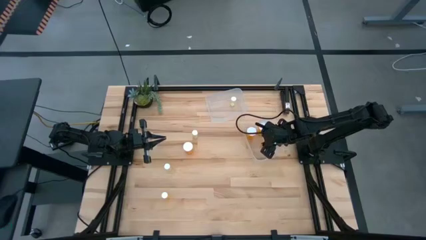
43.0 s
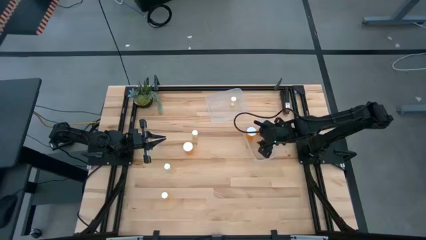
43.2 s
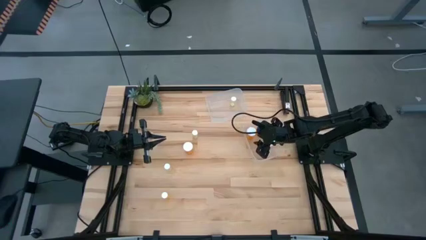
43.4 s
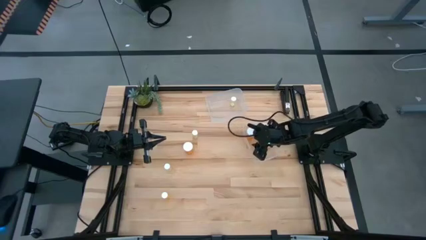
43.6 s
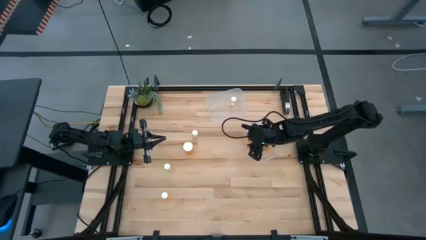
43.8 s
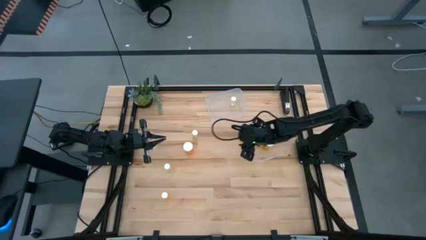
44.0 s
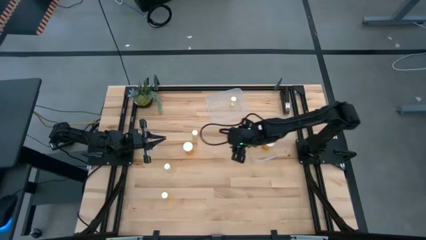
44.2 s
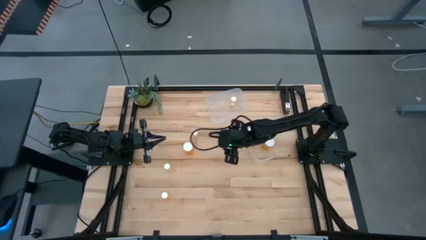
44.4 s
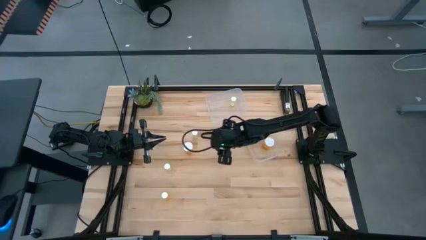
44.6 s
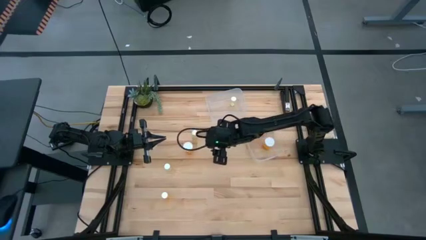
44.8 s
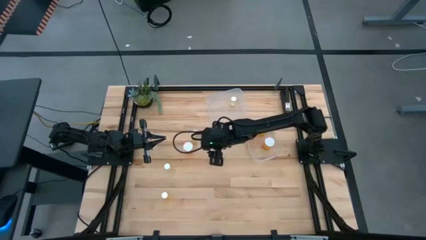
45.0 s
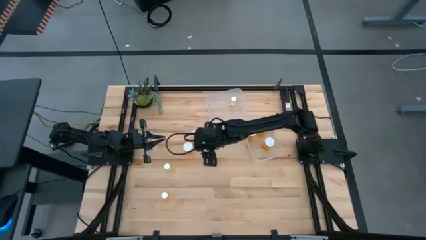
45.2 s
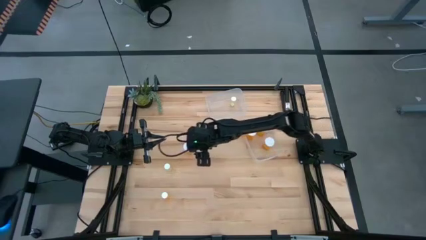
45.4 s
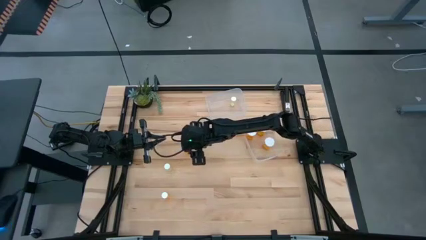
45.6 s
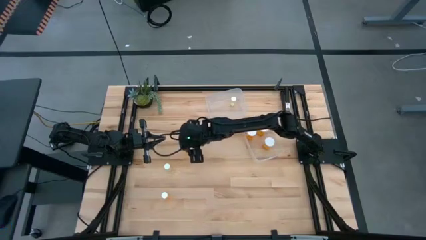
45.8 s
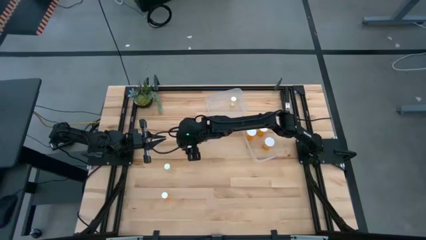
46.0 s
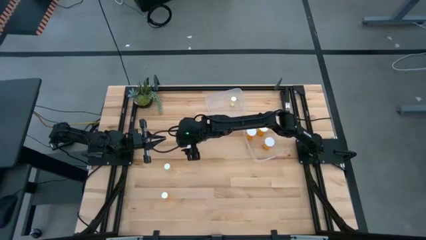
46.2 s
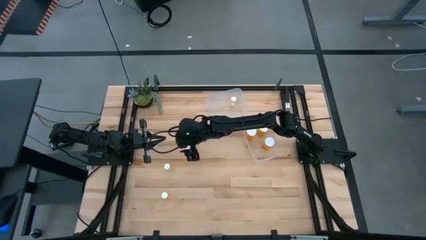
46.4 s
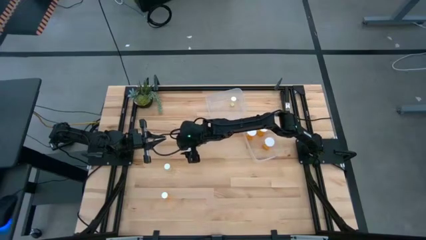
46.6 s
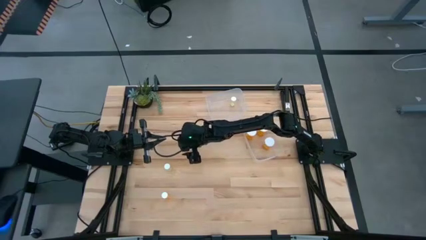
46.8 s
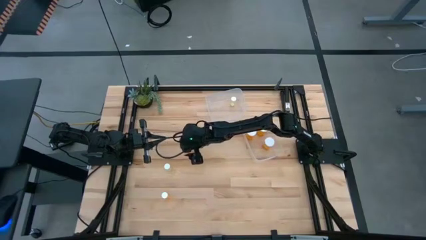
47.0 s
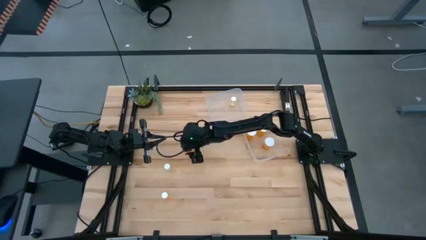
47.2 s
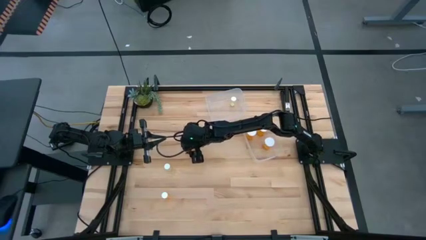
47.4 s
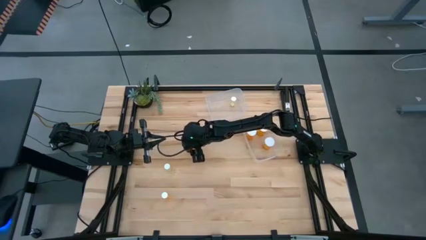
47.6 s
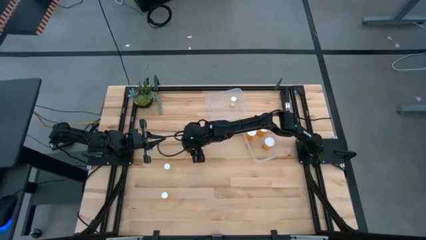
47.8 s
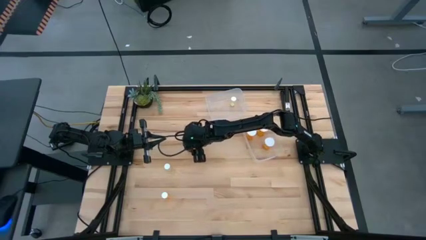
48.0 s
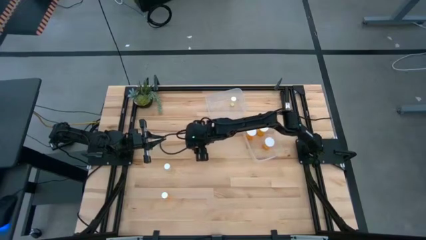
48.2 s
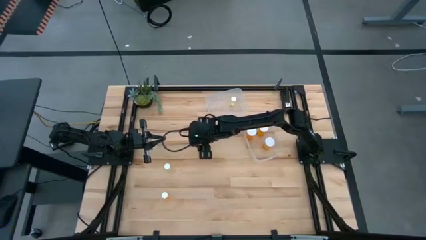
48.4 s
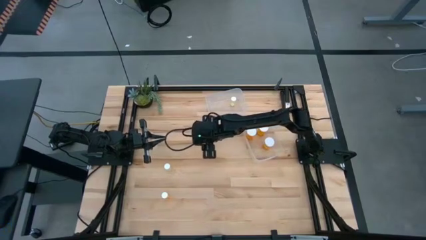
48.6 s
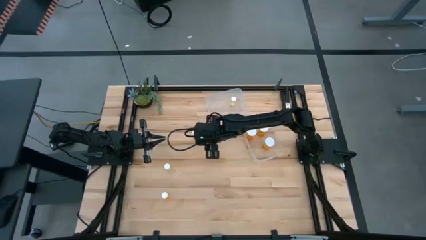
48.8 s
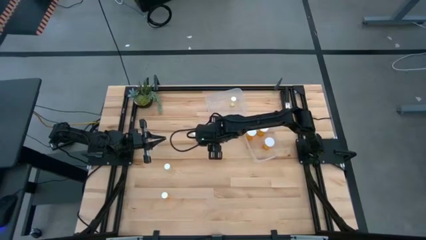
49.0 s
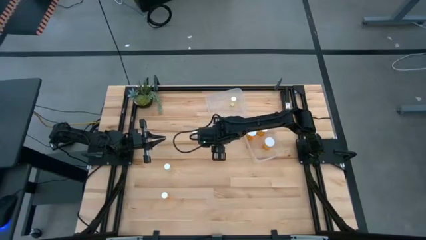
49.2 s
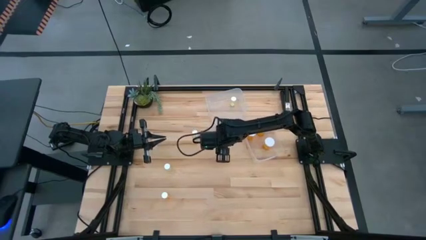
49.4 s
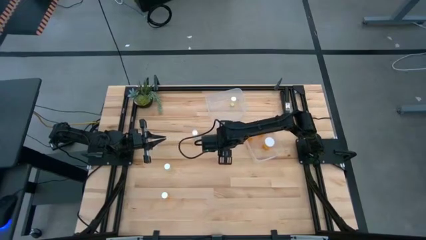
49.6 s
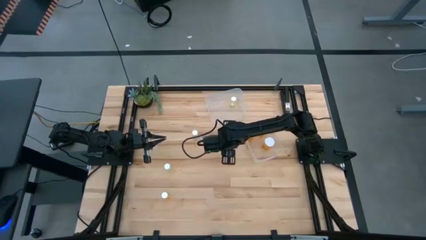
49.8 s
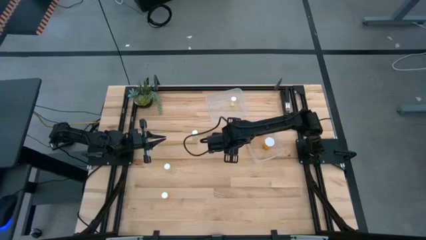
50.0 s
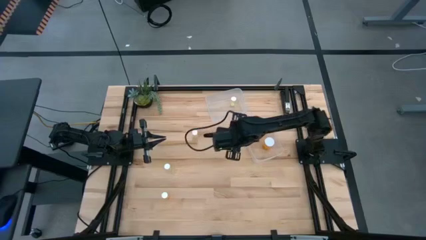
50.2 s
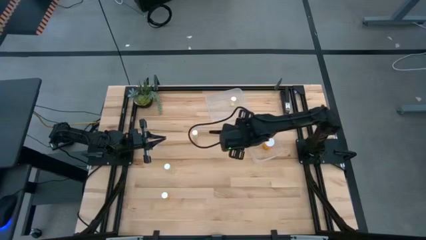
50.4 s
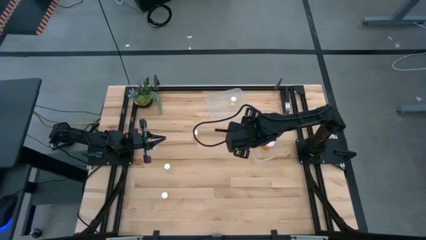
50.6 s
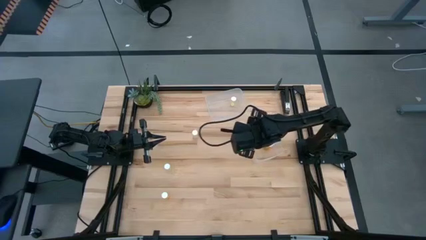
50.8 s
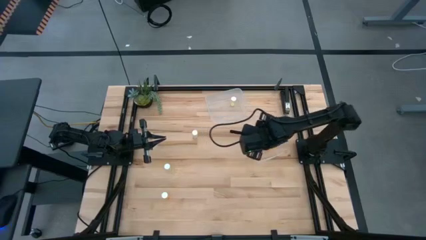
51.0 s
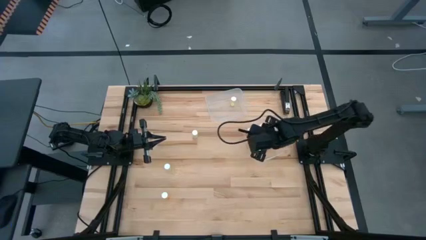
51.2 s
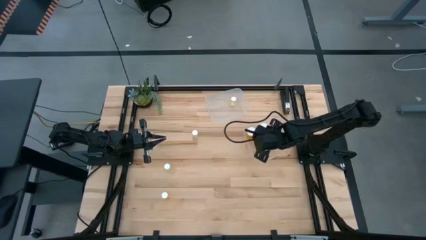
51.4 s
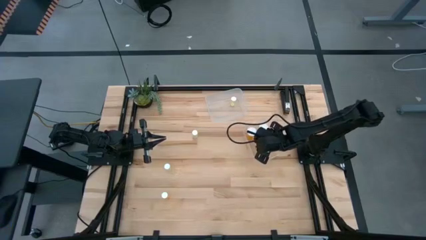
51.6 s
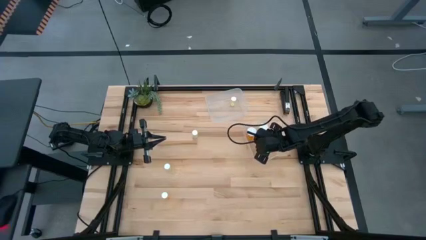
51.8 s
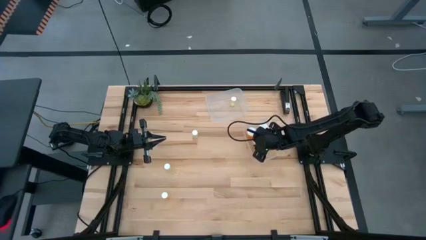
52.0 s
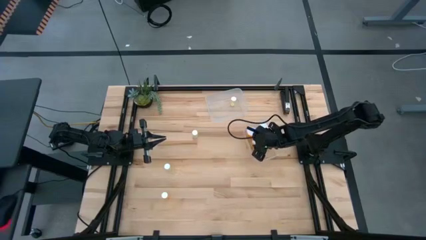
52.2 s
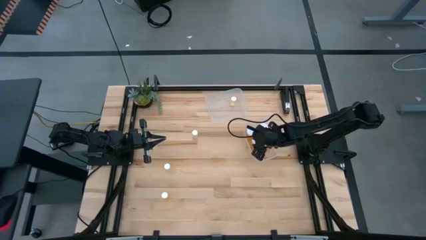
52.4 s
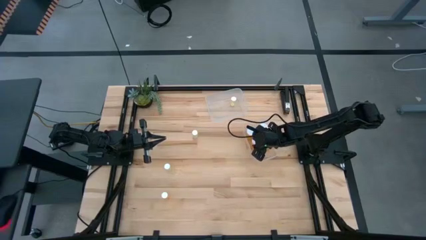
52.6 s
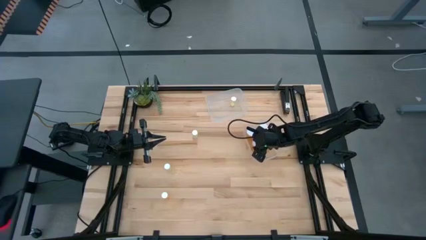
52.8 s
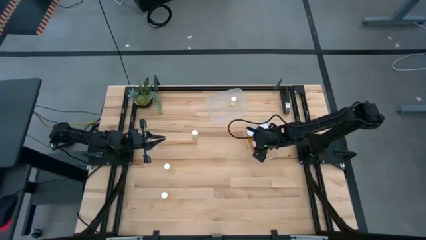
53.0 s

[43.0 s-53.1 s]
Task: Pick and place medicine bottles into bin by pill shape (circle, oval)
Put the big orange pill bottle into the bottom transparent bin

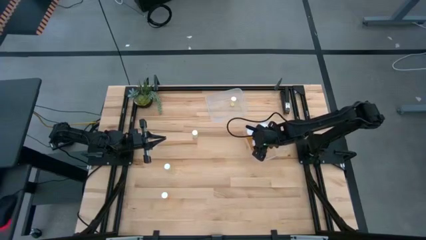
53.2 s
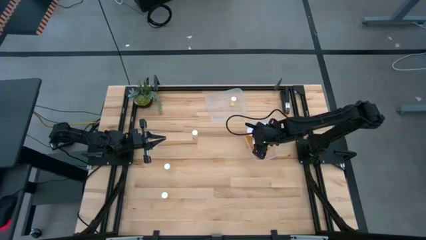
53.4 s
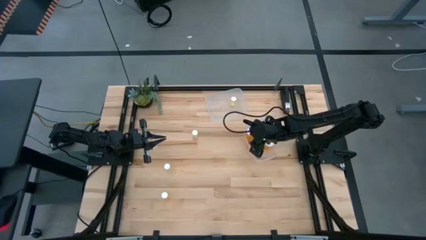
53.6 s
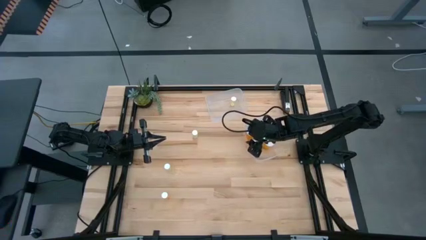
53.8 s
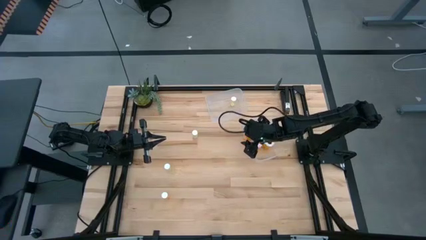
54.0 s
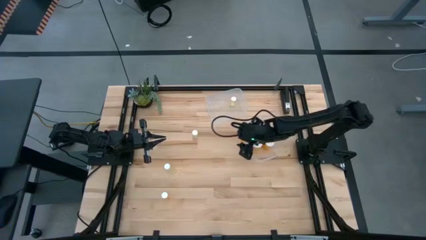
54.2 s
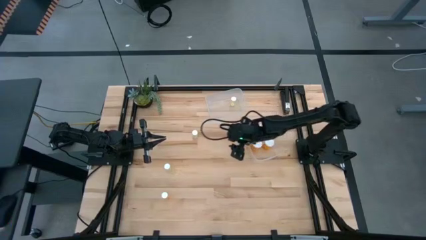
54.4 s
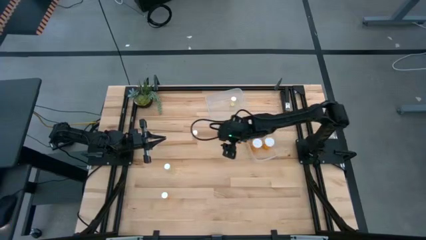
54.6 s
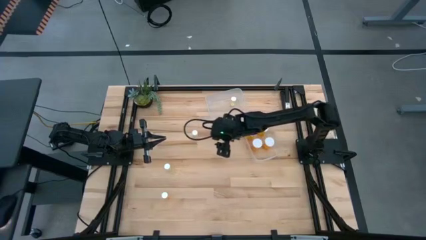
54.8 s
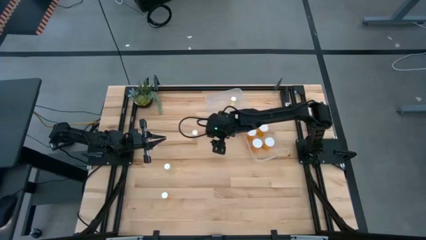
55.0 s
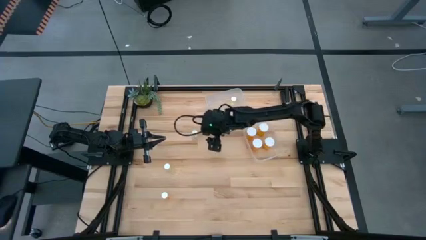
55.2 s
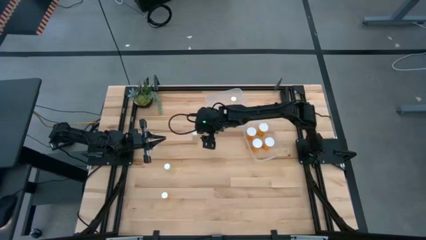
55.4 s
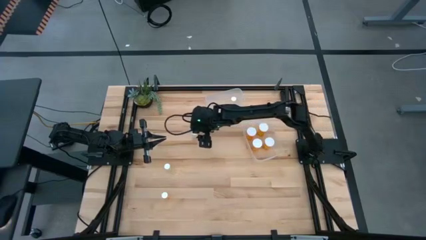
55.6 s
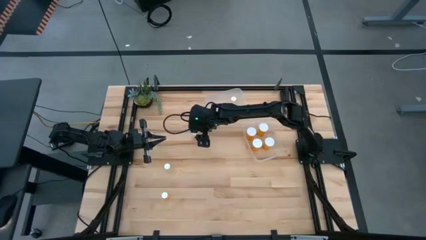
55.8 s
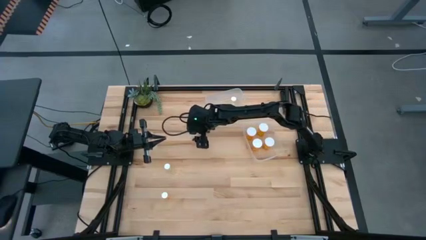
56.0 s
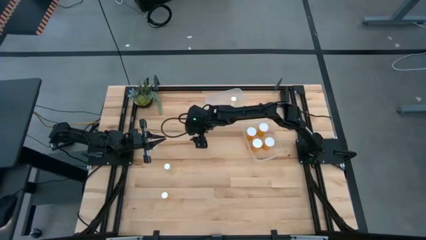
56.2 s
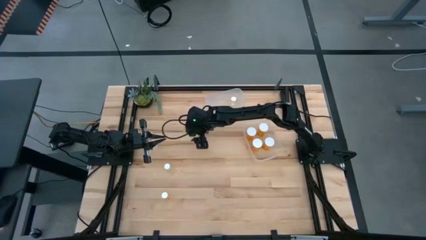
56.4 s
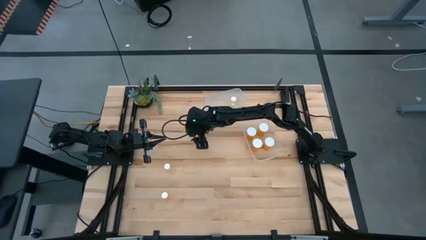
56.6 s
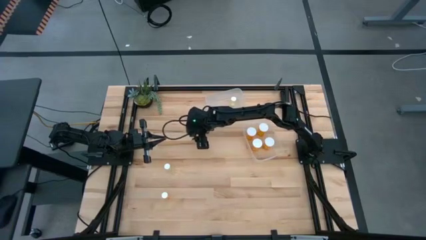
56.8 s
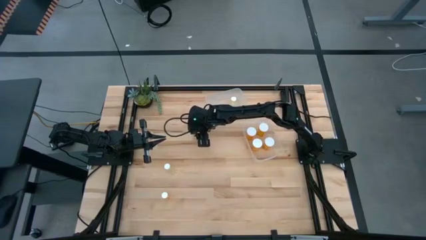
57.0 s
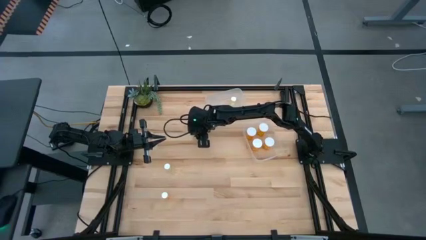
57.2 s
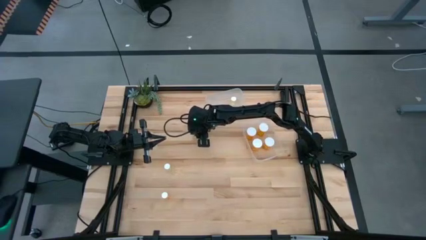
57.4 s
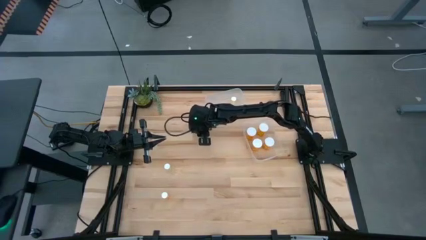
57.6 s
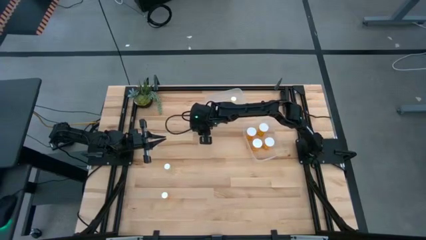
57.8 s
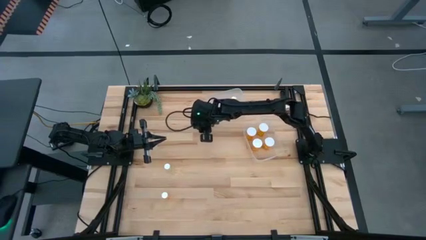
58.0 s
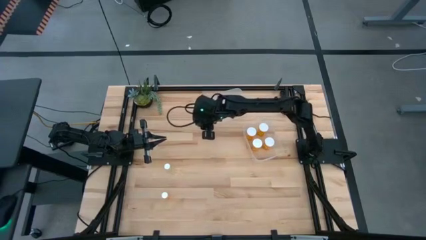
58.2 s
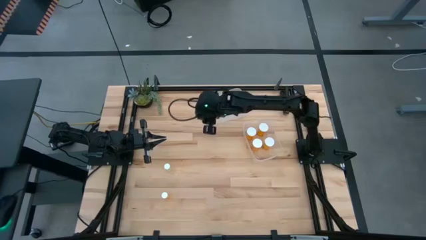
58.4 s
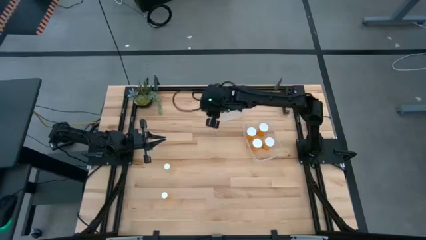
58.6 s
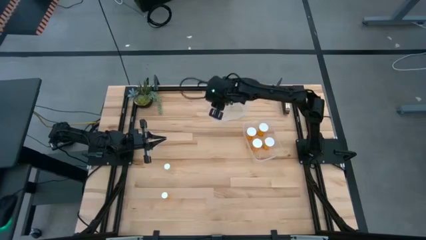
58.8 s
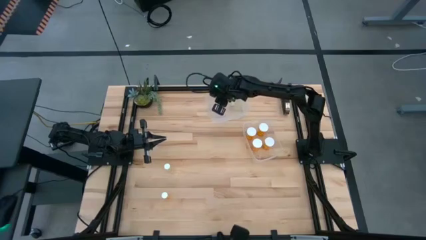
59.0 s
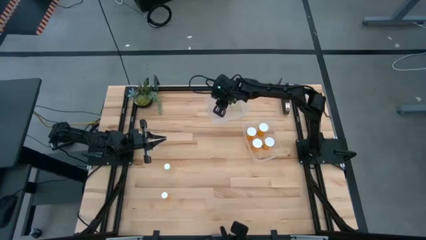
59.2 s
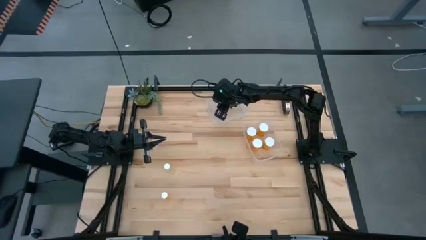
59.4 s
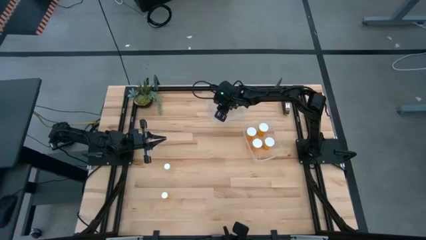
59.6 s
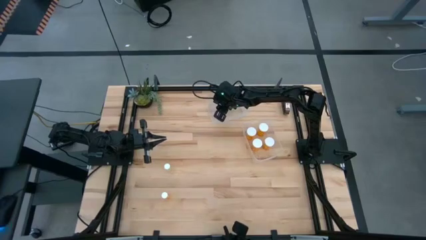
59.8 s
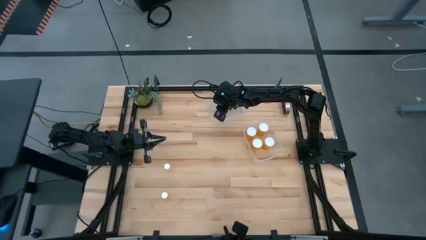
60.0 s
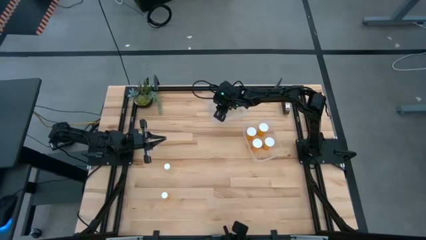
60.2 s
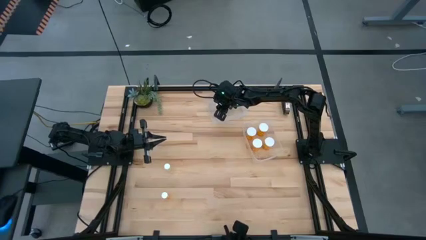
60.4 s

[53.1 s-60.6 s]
Put the top small yellow pill bottle into the top transparent bin
